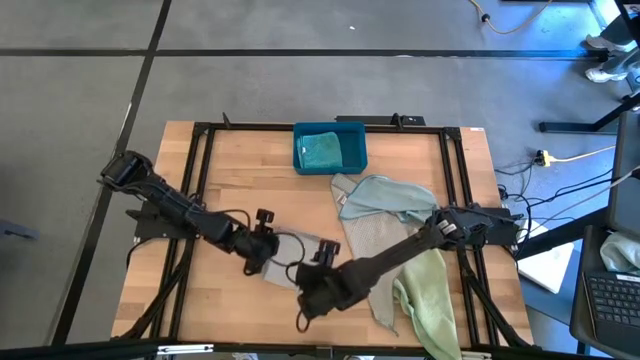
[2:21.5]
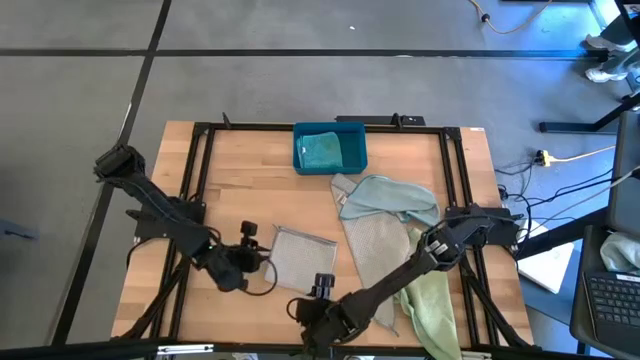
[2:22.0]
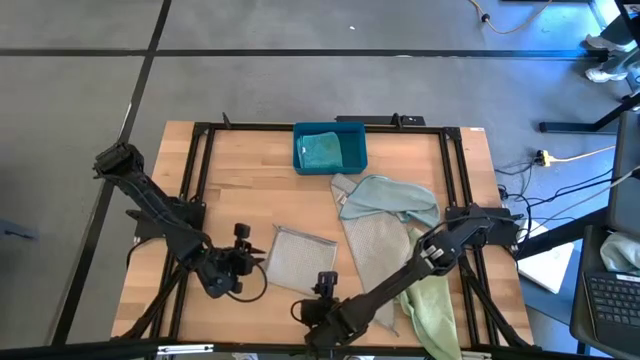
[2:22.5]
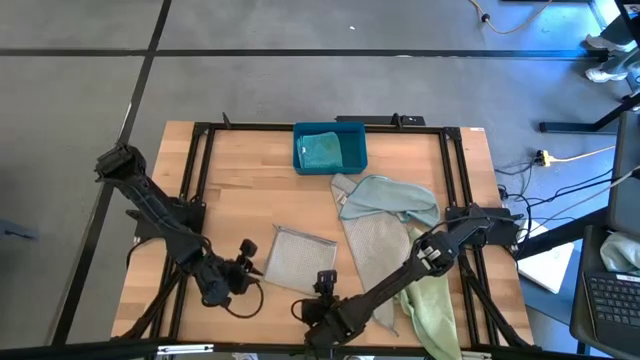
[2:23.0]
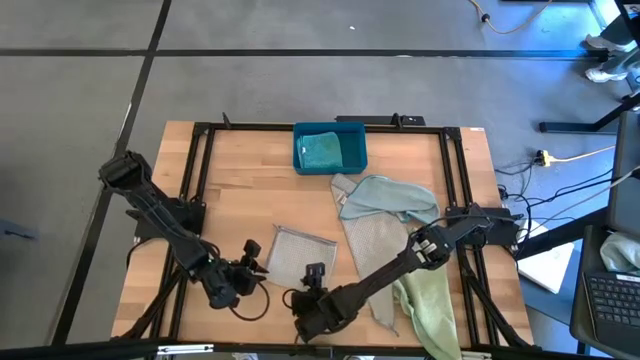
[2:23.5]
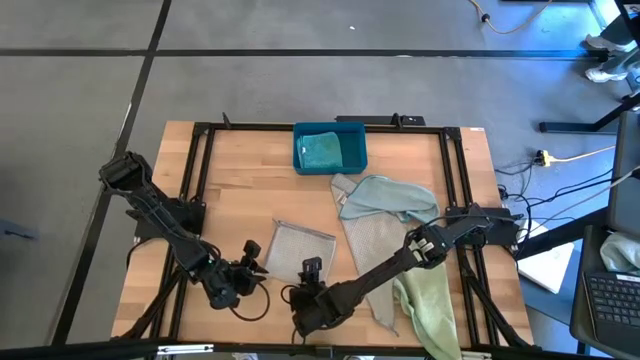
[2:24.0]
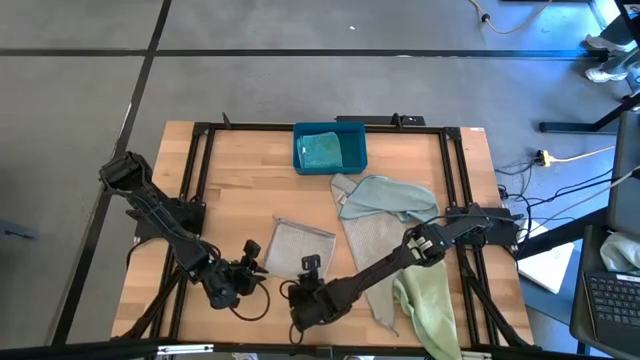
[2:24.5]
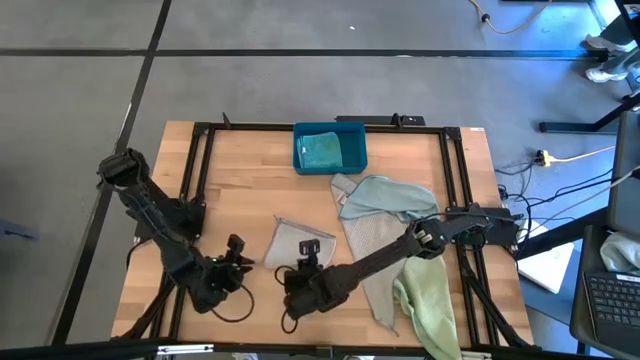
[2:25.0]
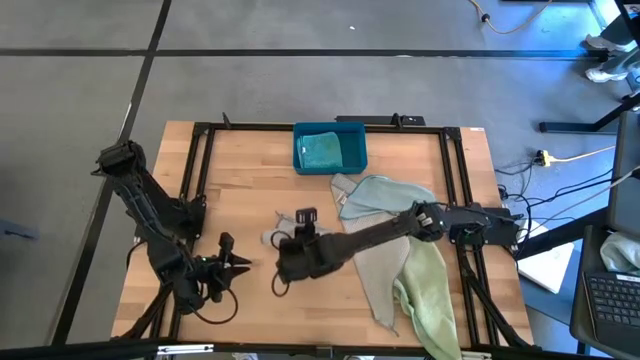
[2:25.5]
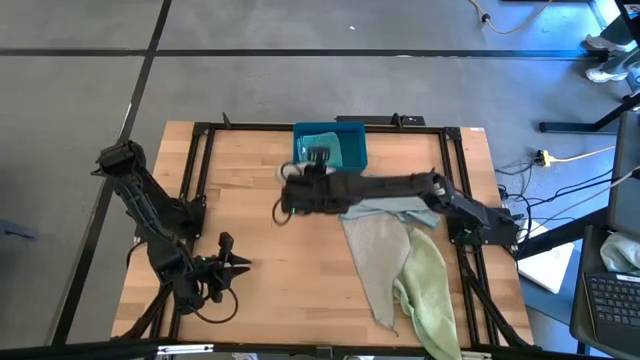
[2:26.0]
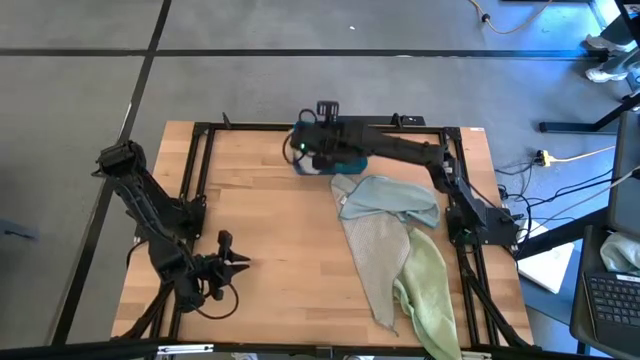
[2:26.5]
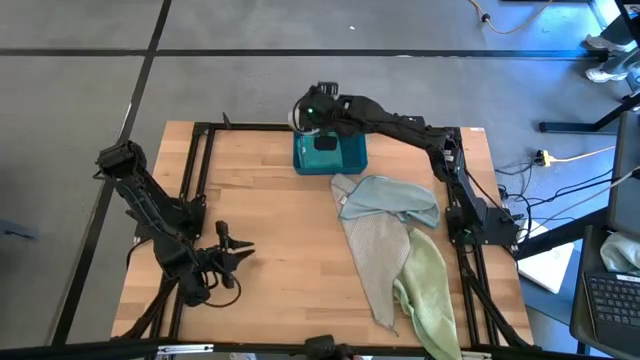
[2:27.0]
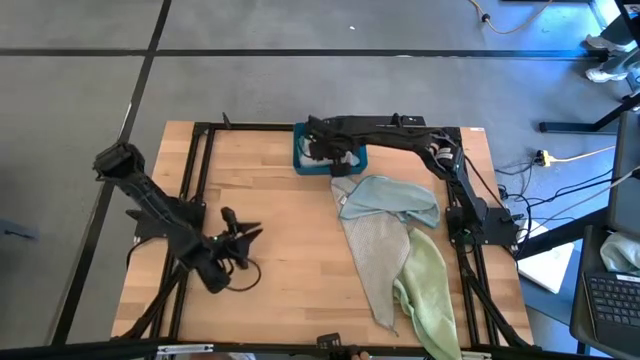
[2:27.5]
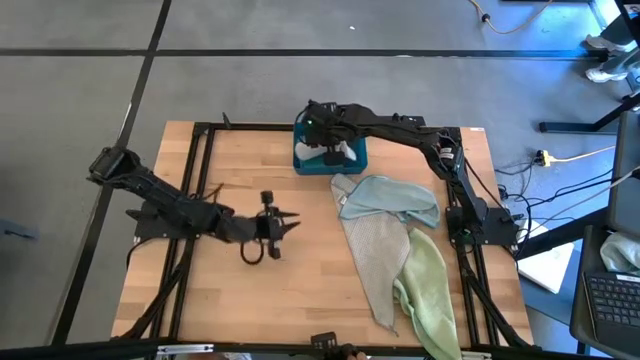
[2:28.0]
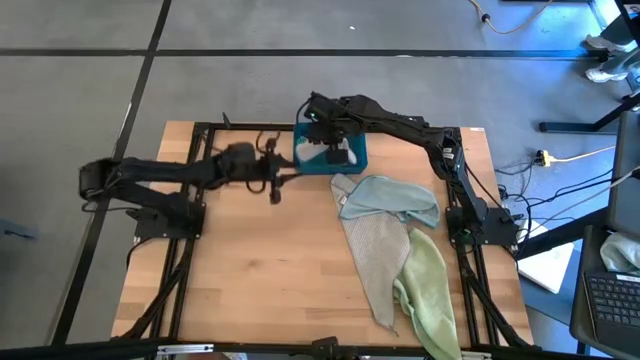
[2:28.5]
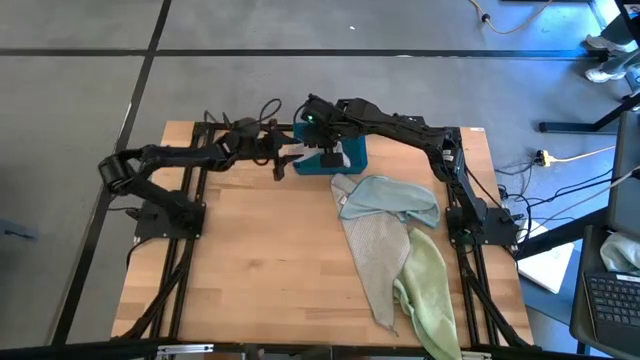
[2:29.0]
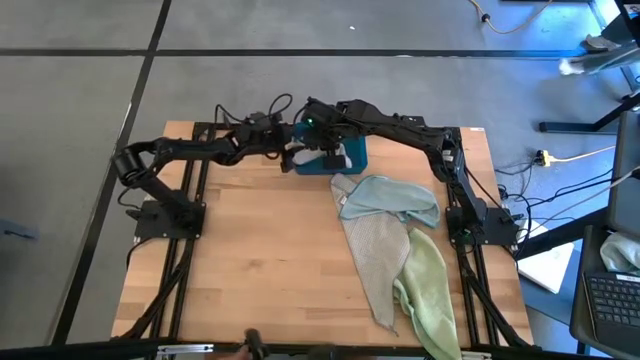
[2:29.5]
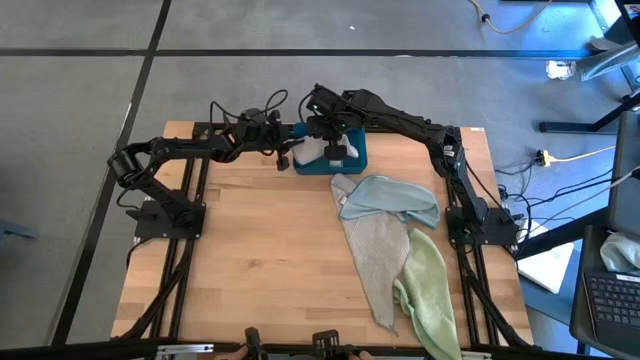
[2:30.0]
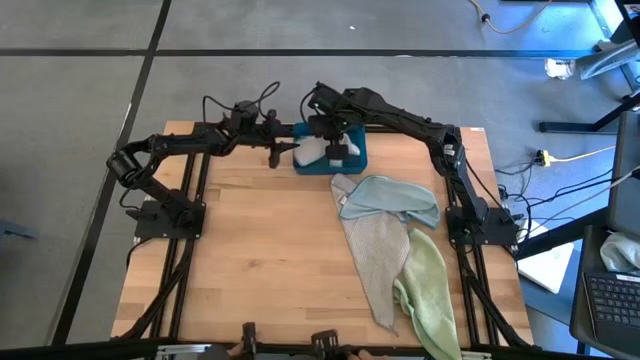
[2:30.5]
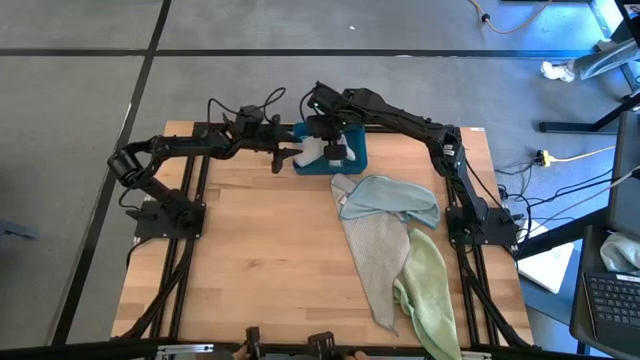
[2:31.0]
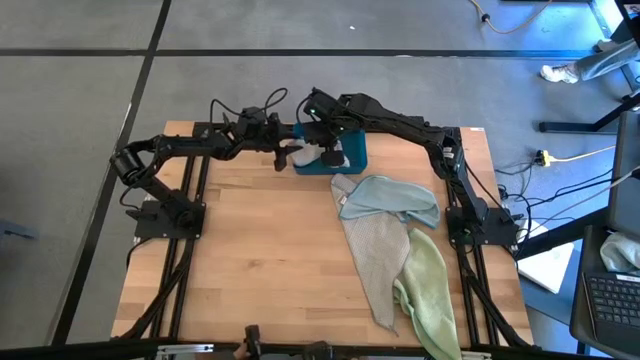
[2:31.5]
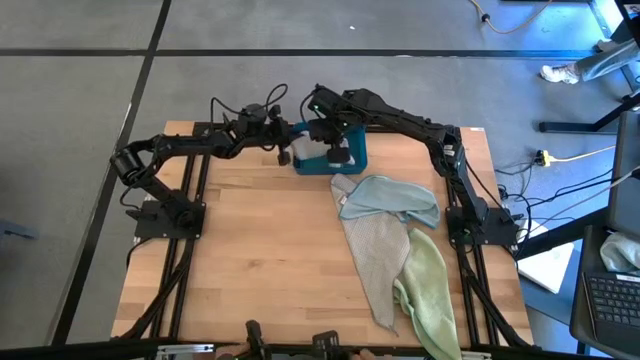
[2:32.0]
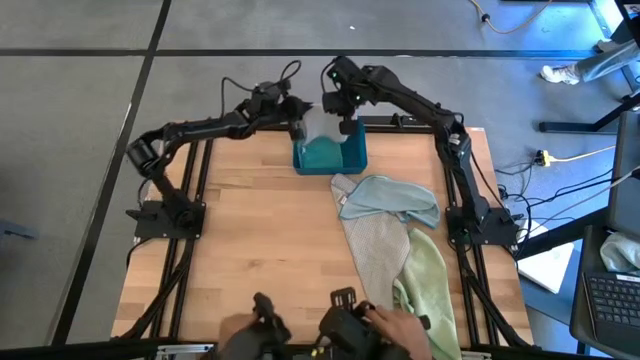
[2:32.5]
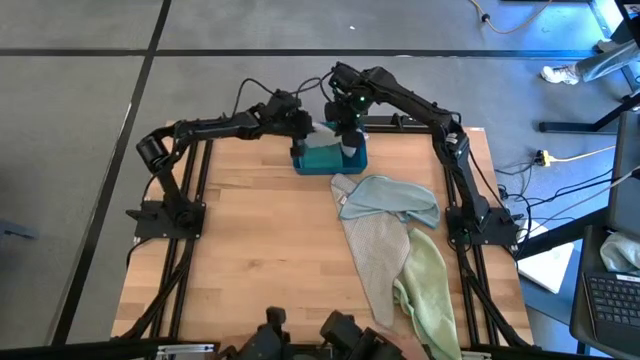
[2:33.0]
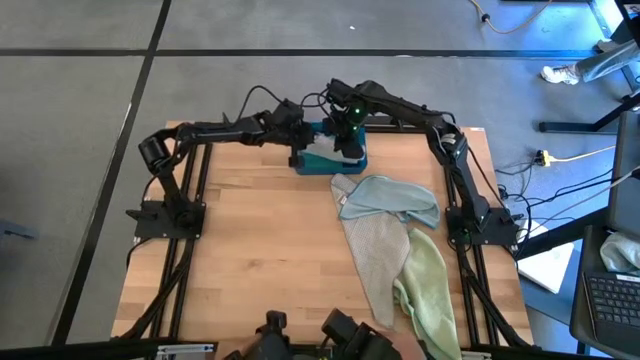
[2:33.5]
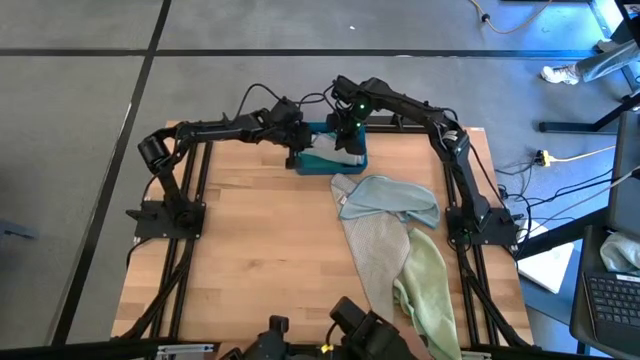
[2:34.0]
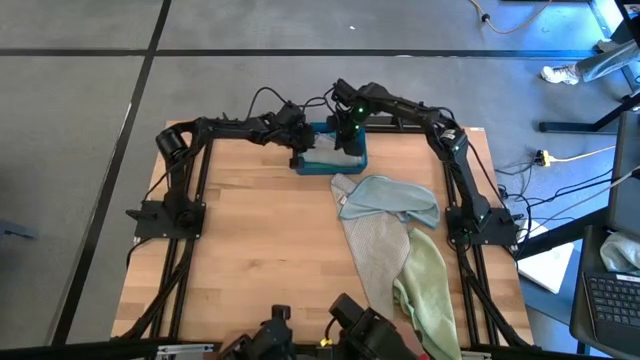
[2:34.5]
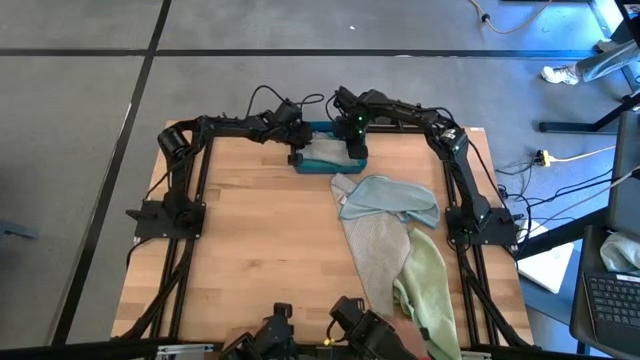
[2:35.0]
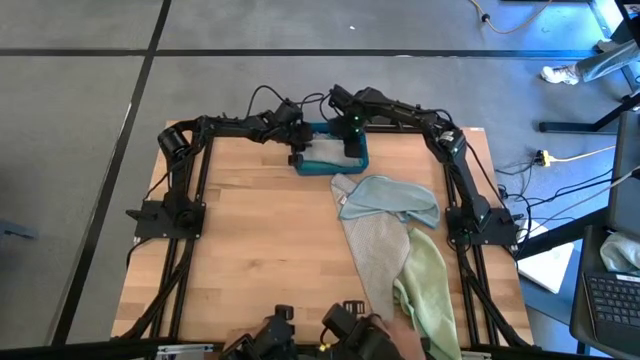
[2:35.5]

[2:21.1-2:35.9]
Task: Fold microfiber towels
Put the left folded gray towel into the blue bin

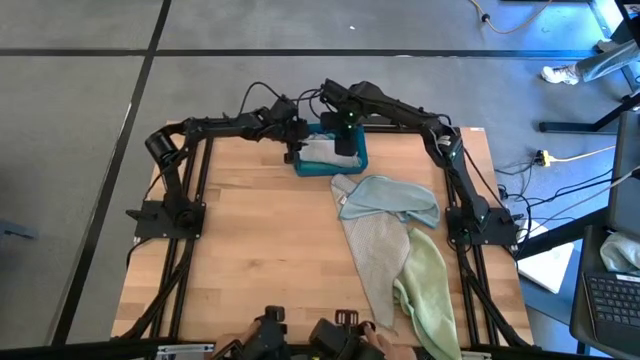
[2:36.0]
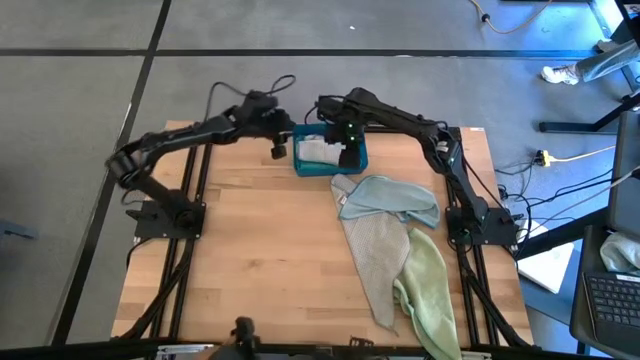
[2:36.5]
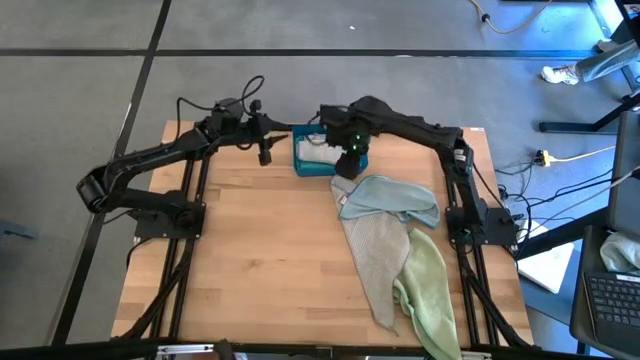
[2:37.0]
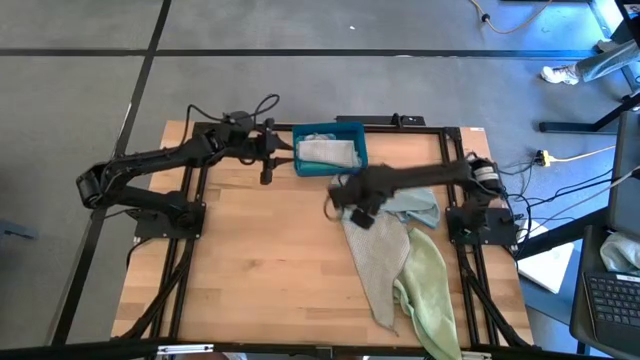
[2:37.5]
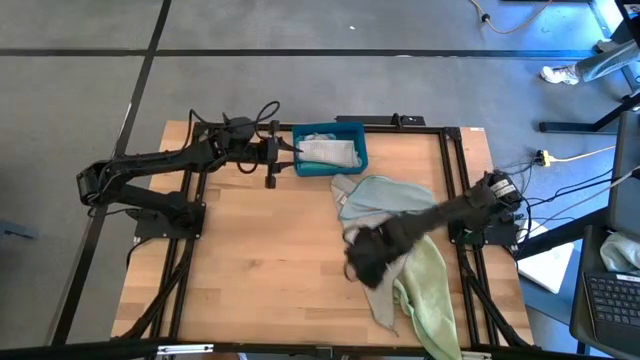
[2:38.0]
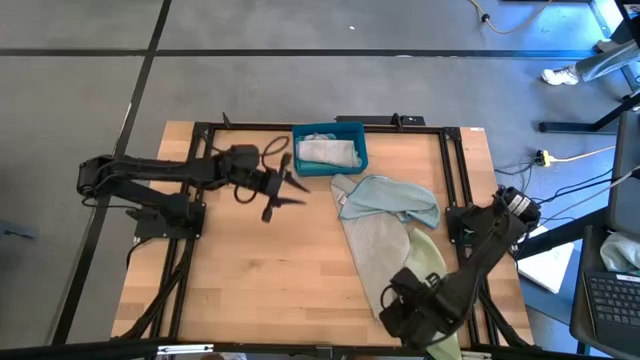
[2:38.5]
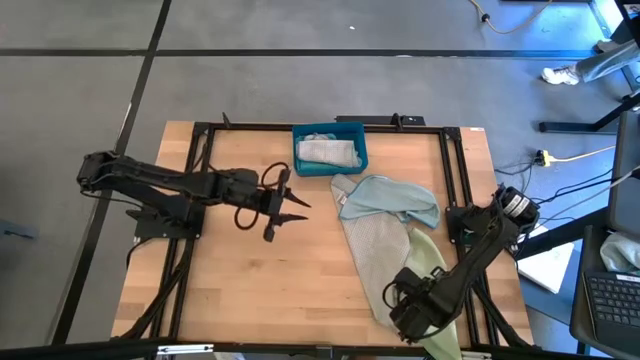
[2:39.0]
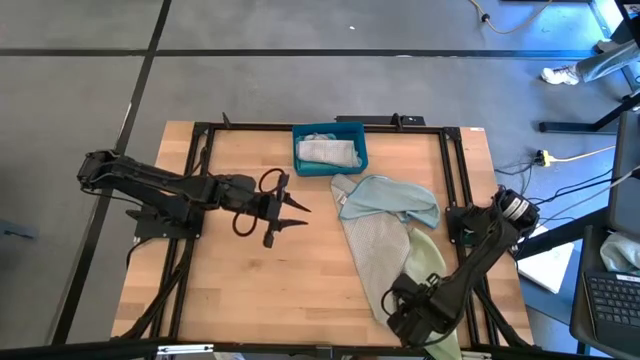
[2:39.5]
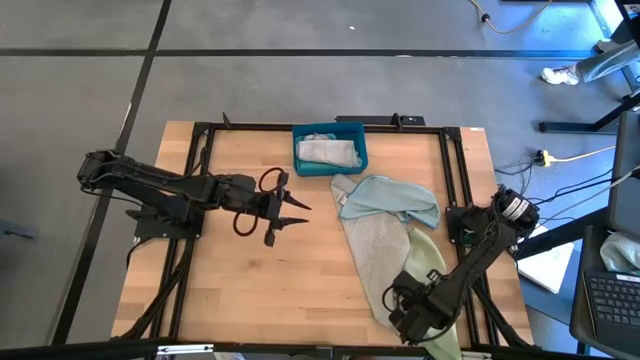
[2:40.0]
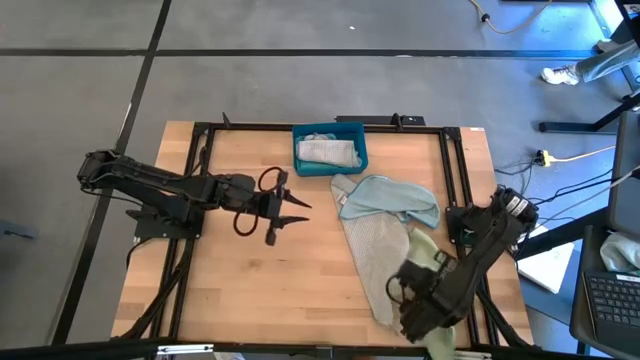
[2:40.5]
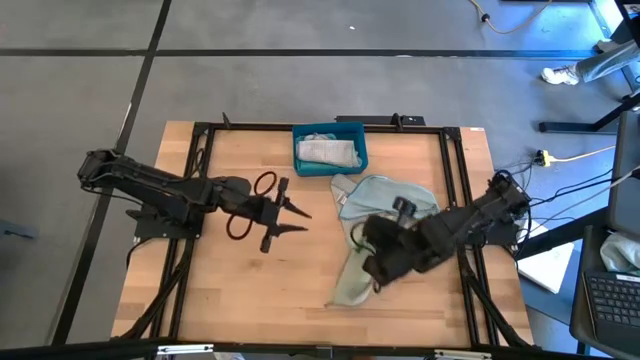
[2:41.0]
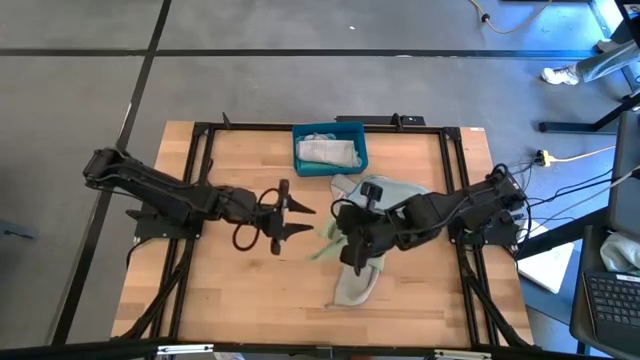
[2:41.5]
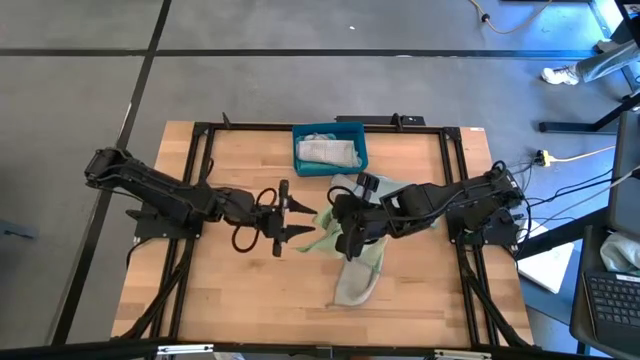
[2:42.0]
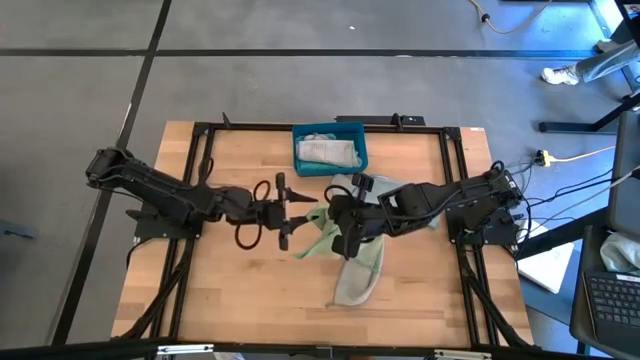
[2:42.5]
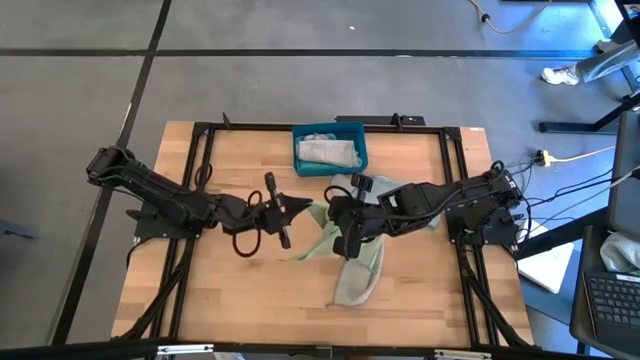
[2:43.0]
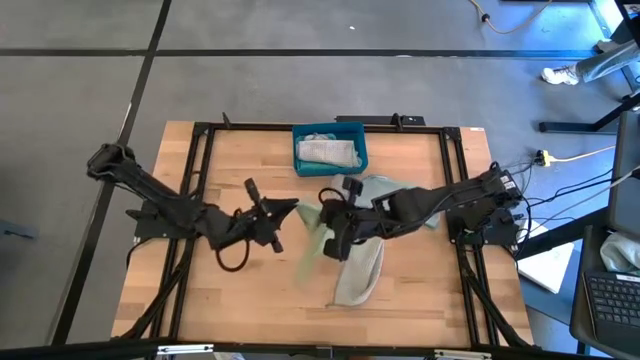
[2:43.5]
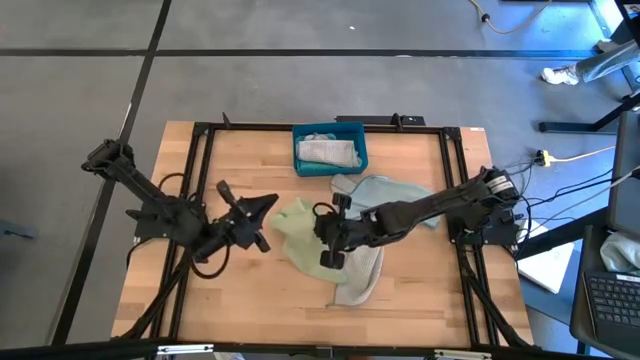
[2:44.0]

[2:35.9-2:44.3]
Fold the green towel
